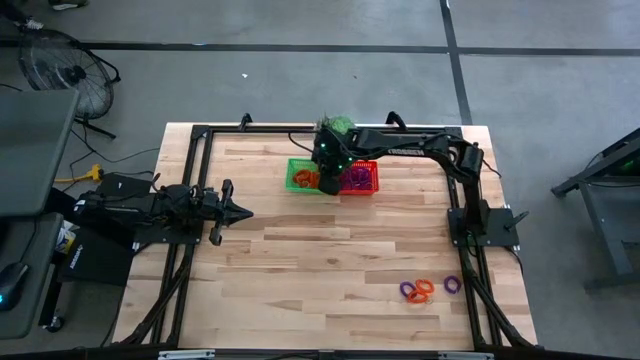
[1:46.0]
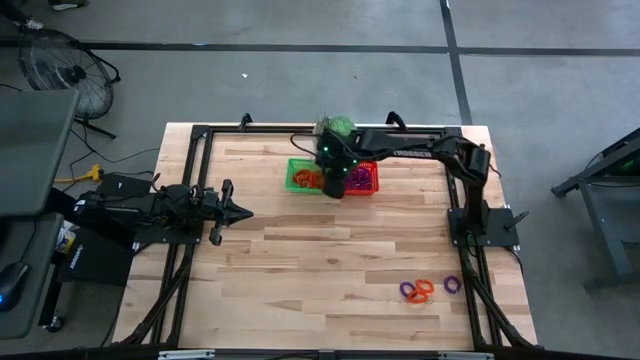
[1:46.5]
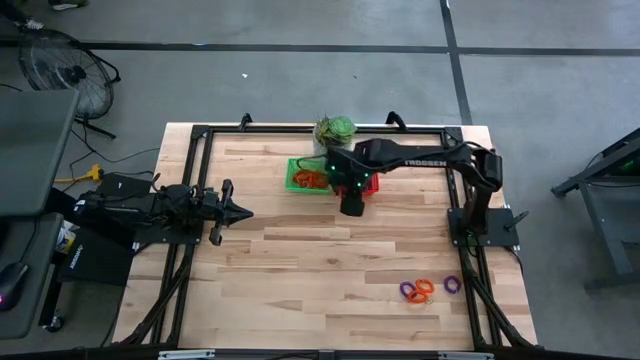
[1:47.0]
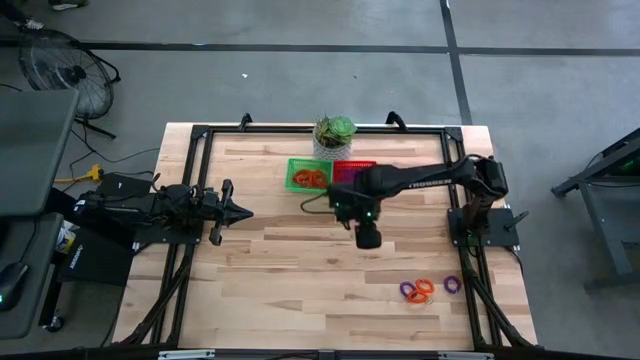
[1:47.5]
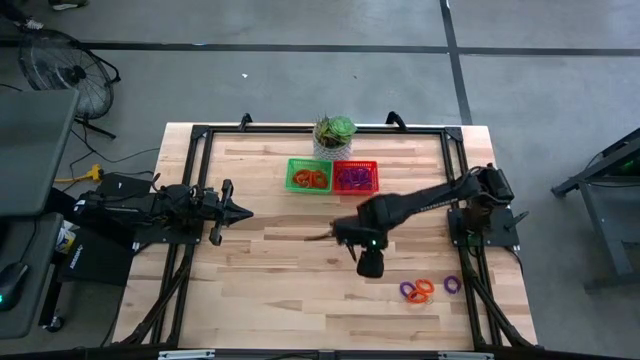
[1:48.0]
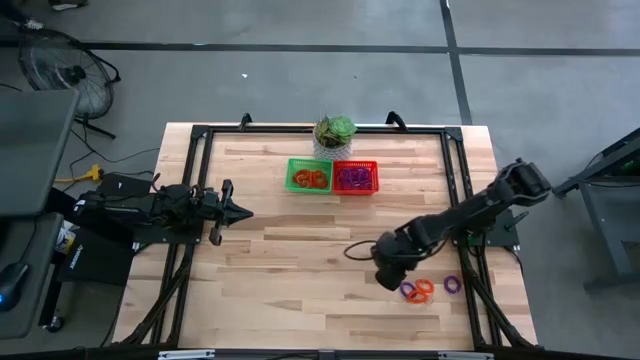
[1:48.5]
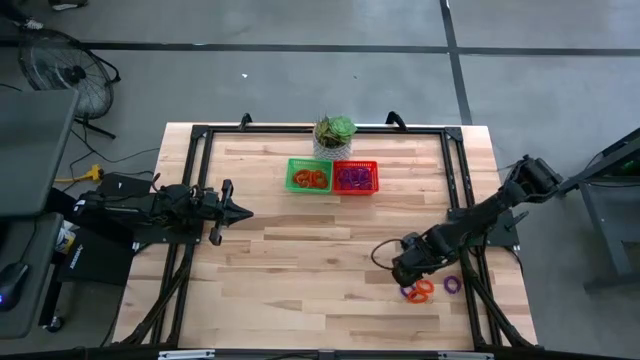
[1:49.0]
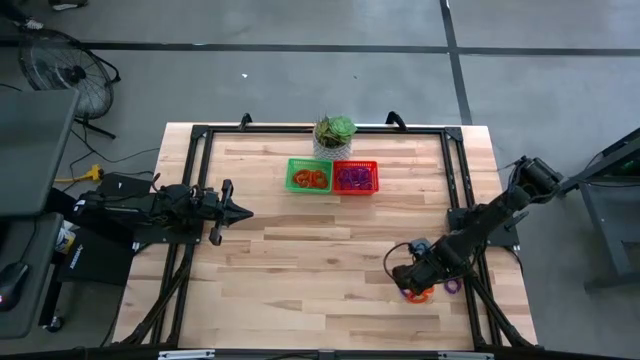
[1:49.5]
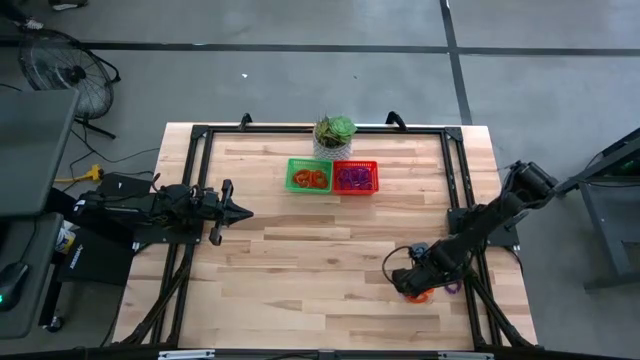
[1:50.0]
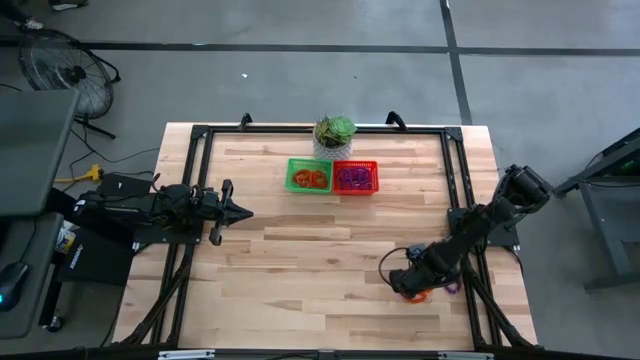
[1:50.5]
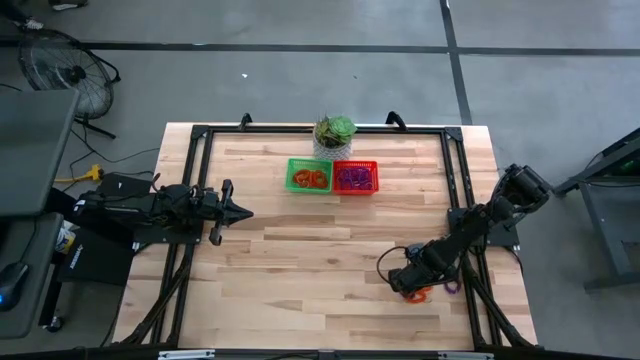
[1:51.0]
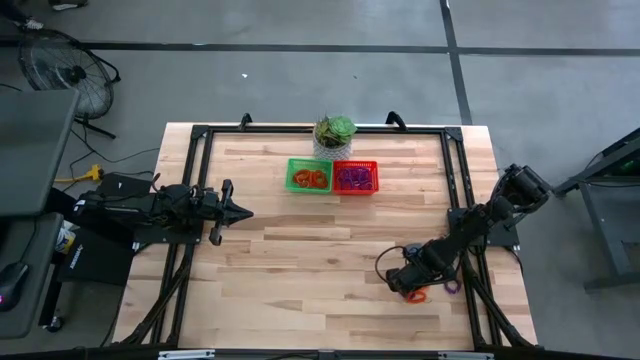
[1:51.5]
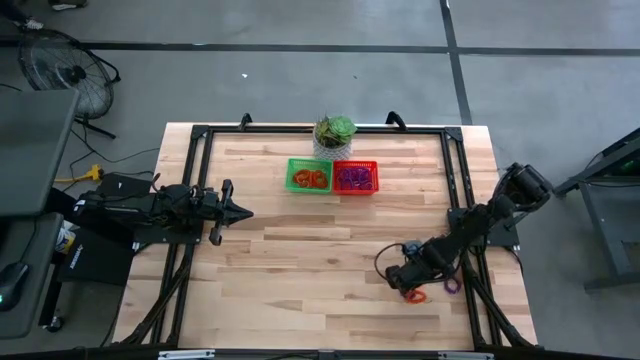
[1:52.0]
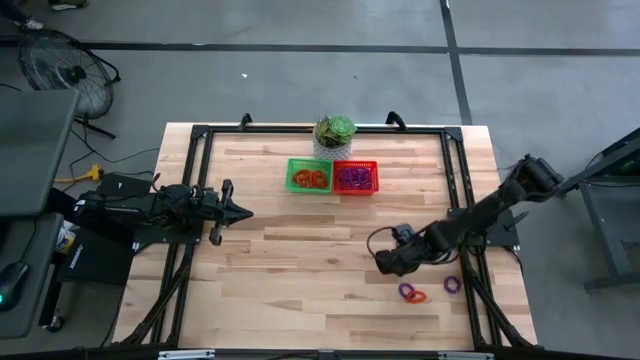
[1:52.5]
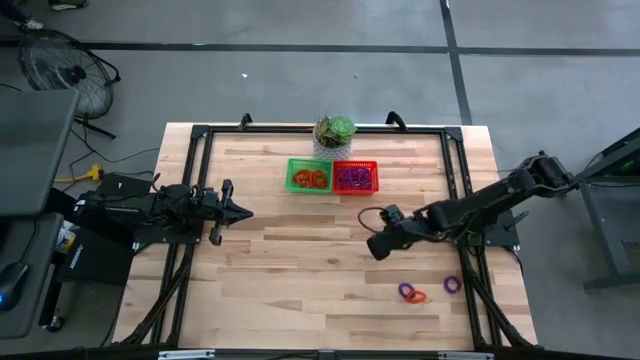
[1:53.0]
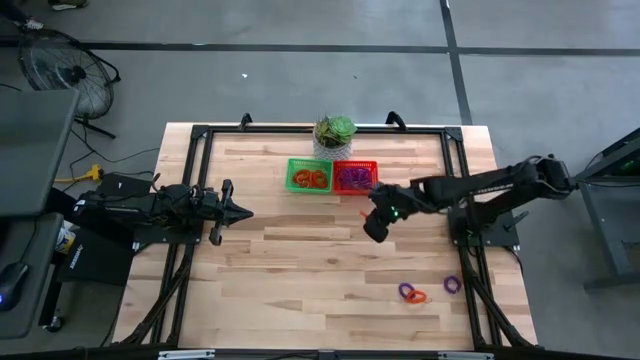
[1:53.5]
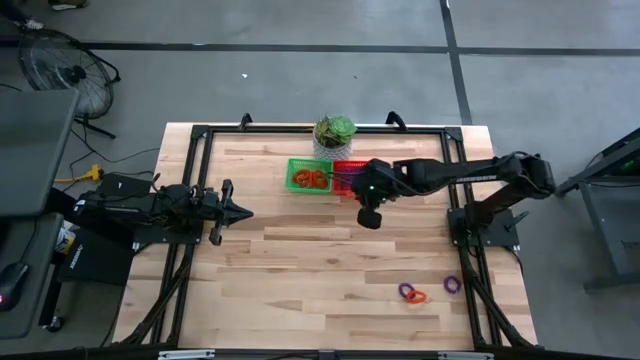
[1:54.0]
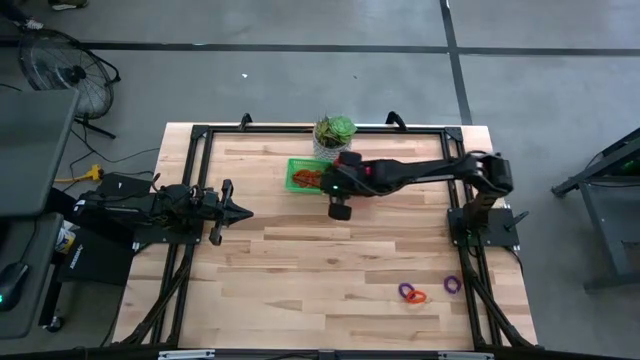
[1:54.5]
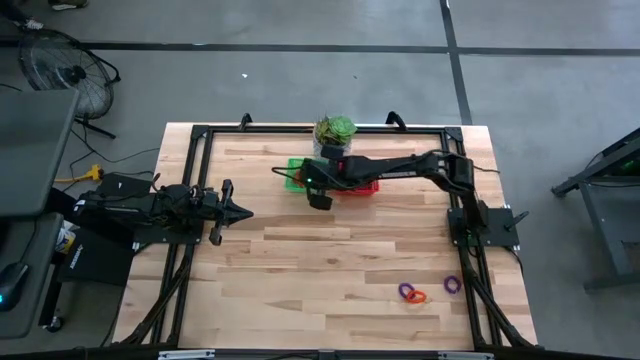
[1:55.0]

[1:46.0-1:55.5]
Task: Sort spring keychains
Put the orange spring keychain into the green bin

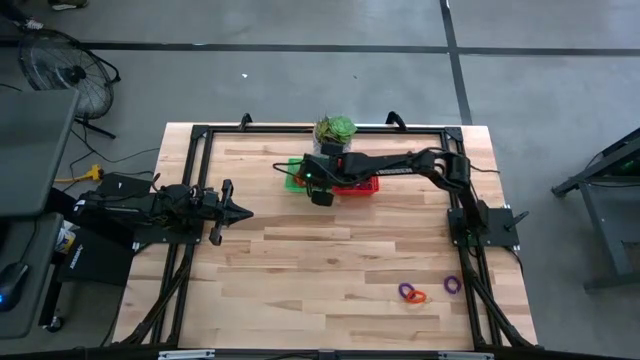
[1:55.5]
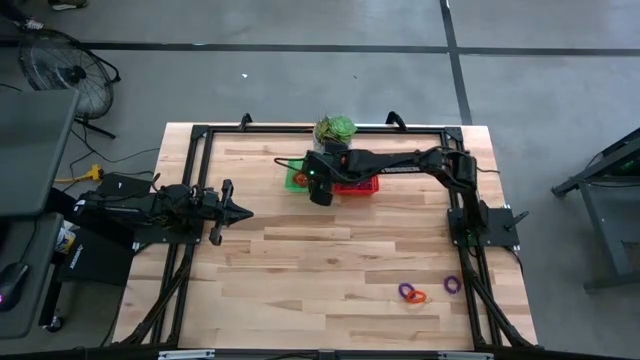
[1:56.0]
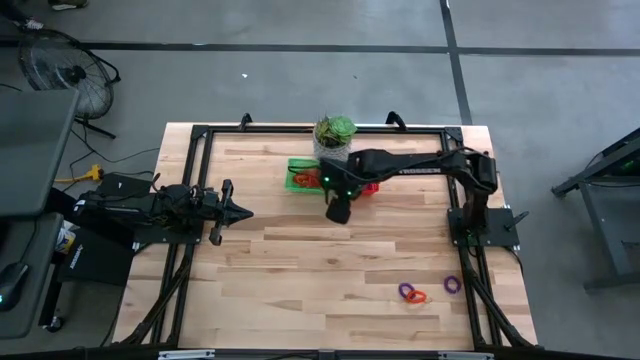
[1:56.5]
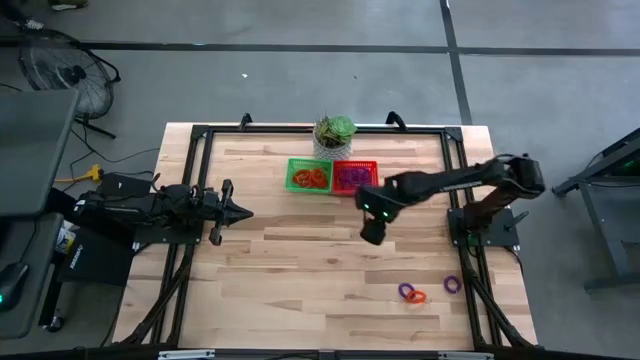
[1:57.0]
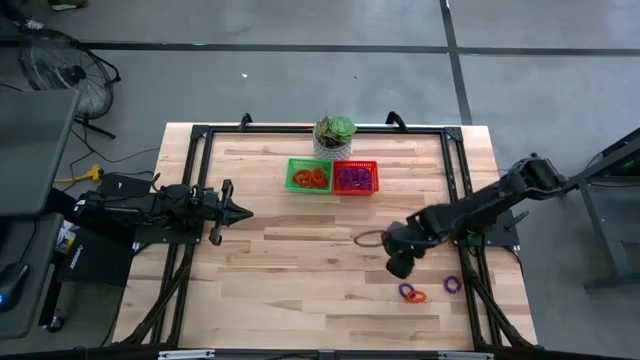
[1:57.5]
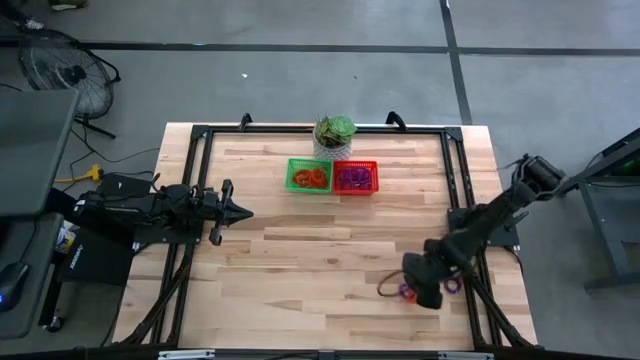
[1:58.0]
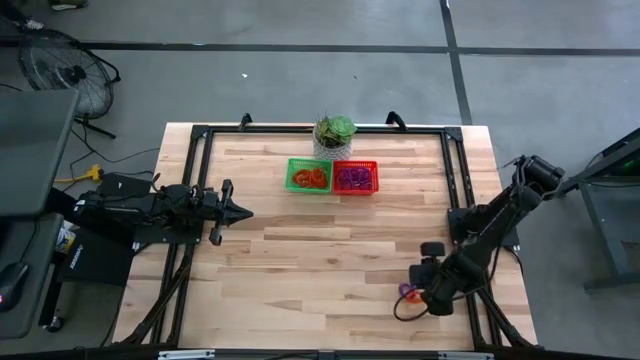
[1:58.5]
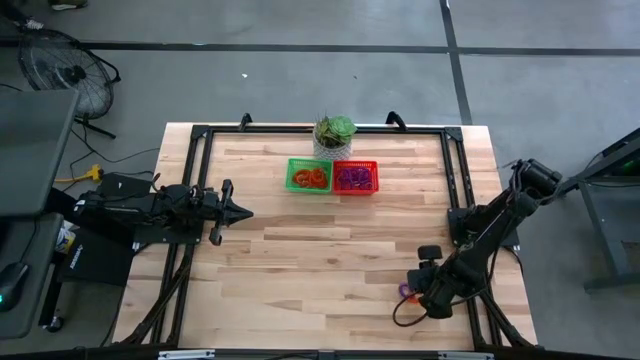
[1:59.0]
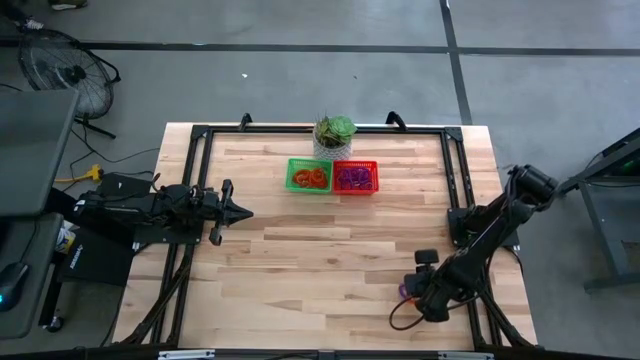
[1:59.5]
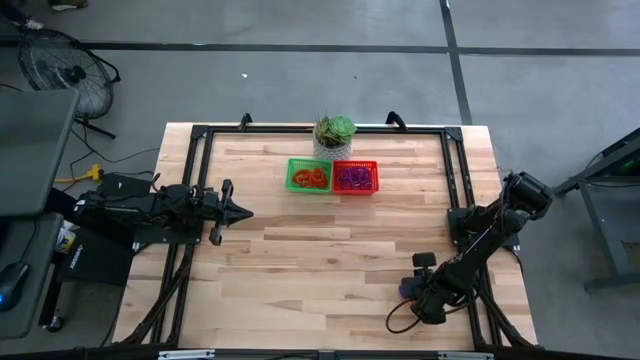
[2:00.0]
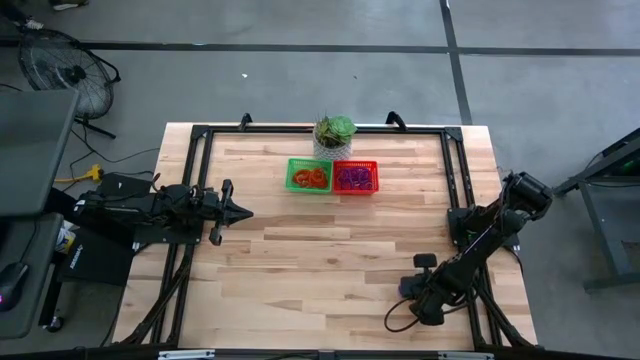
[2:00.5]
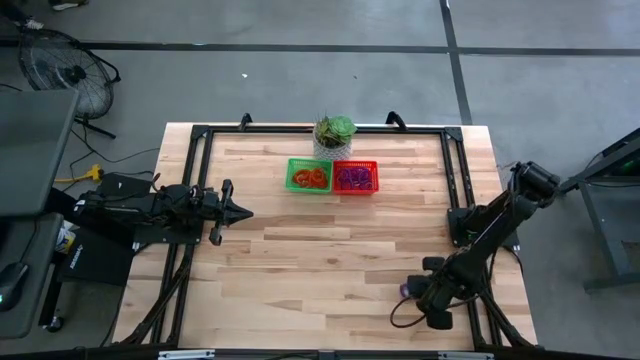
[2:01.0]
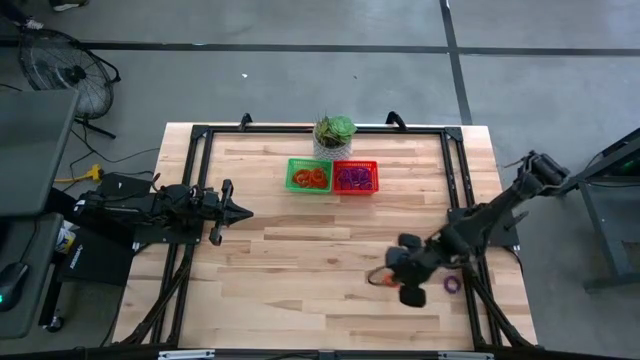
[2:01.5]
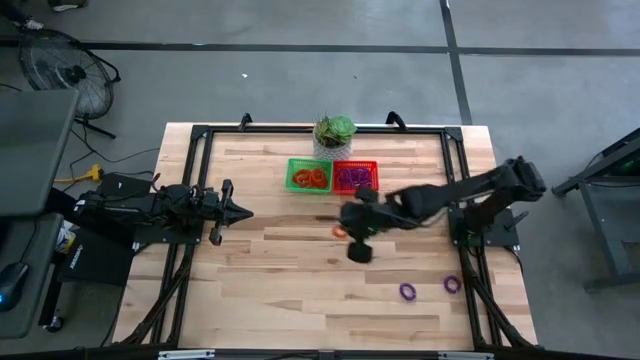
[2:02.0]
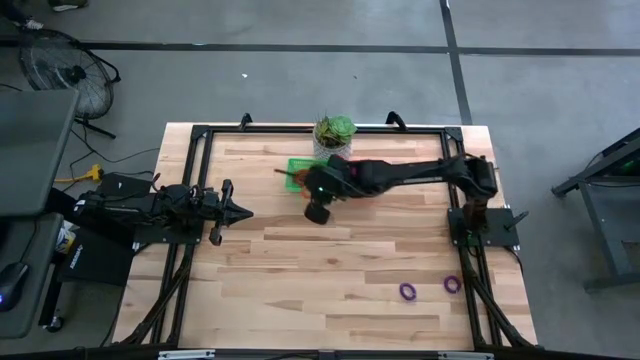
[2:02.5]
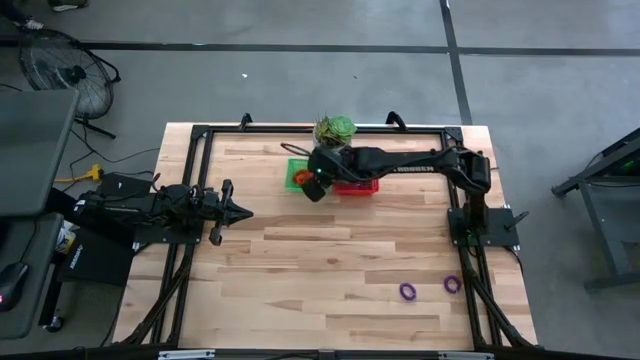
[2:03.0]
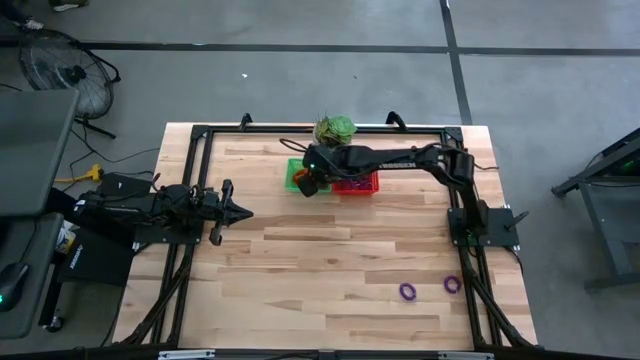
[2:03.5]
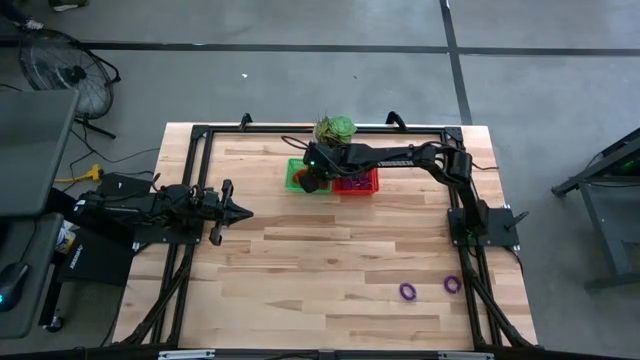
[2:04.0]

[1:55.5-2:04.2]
Put the orange spring keychain into the green bin

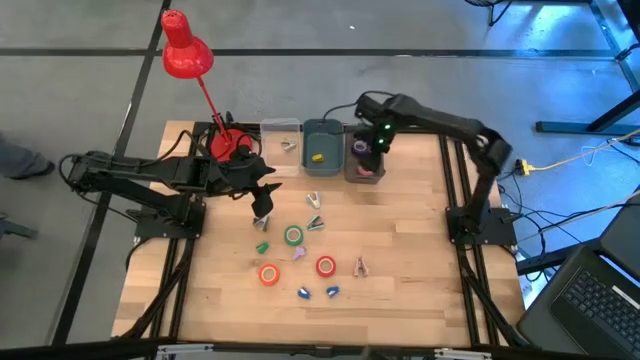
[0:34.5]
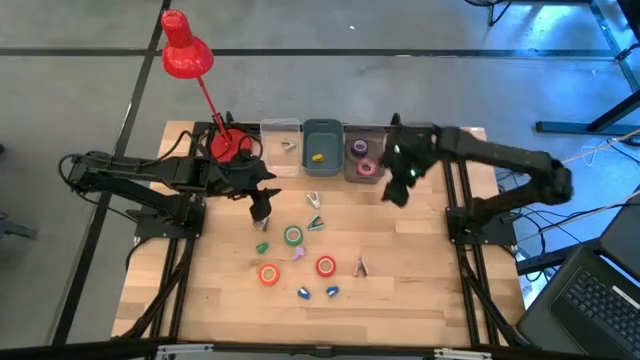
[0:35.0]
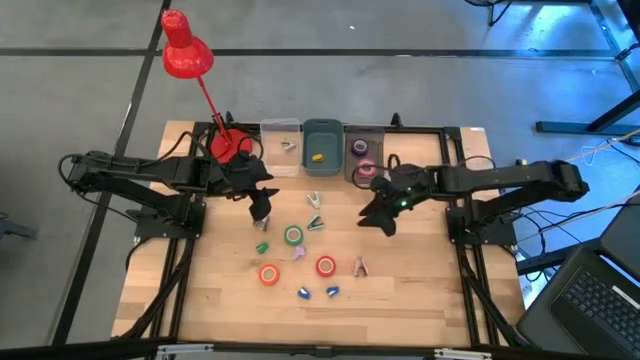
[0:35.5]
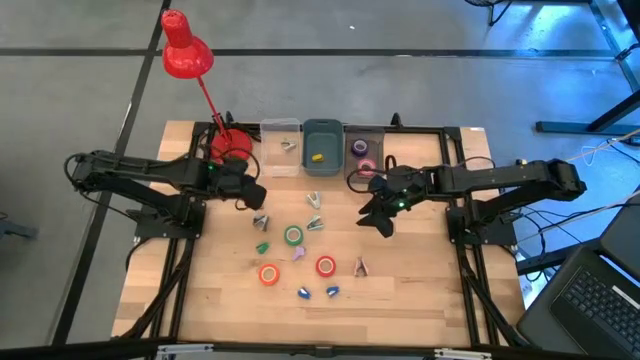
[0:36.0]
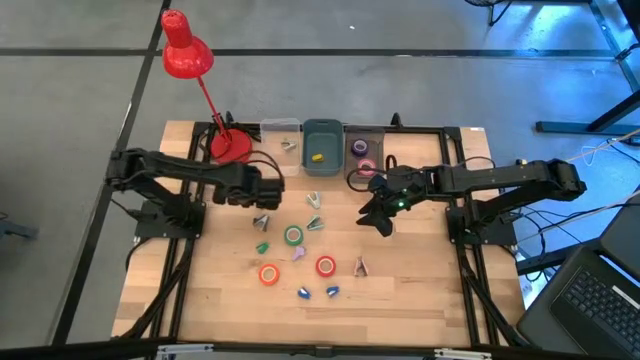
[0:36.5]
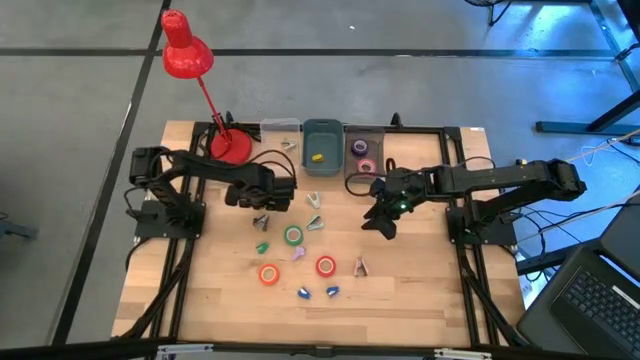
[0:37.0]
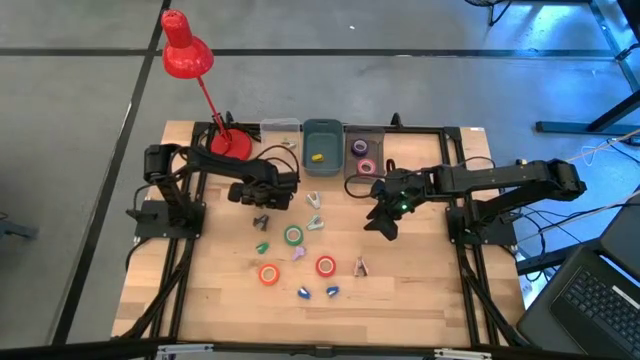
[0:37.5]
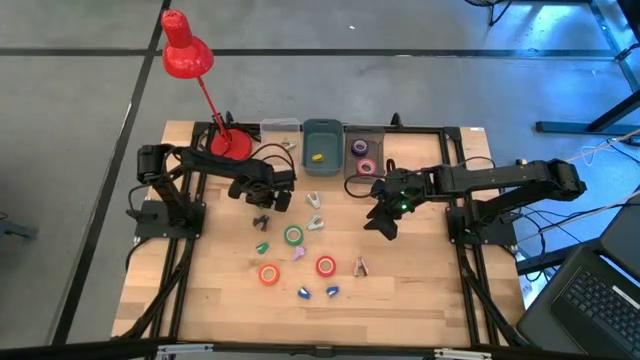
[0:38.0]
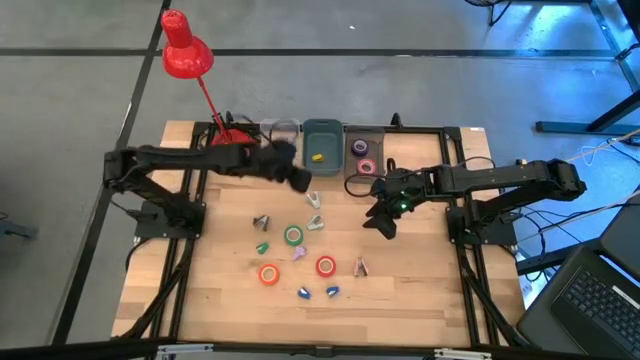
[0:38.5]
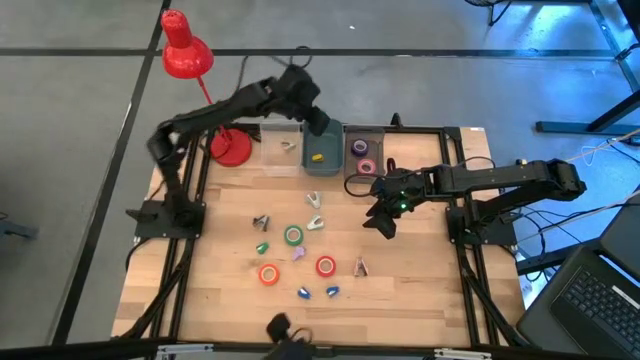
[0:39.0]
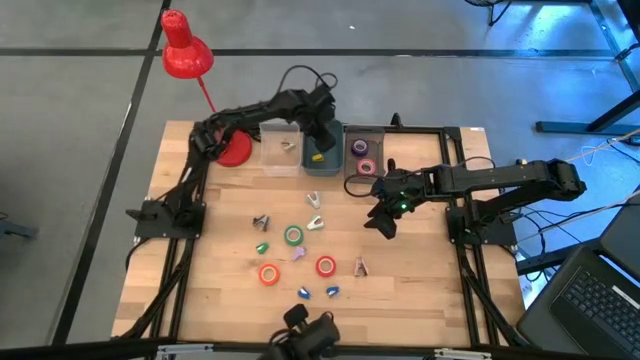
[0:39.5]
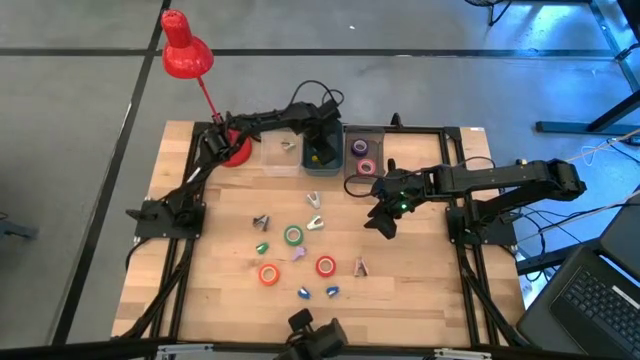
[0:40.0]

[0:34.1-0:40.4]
Task: Pick and place Stapler, Stapler remover, tape
Put the top green stapler into the blue bin
